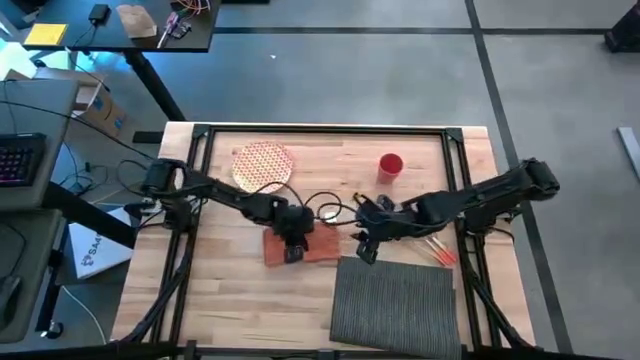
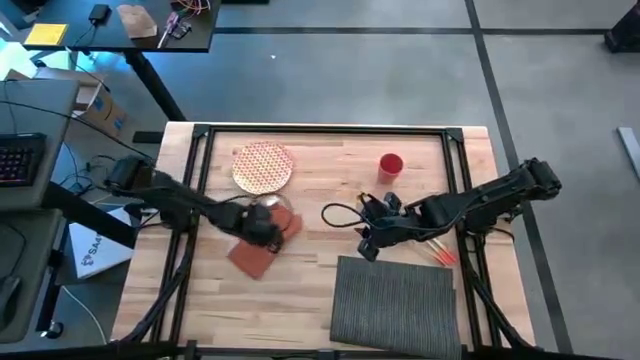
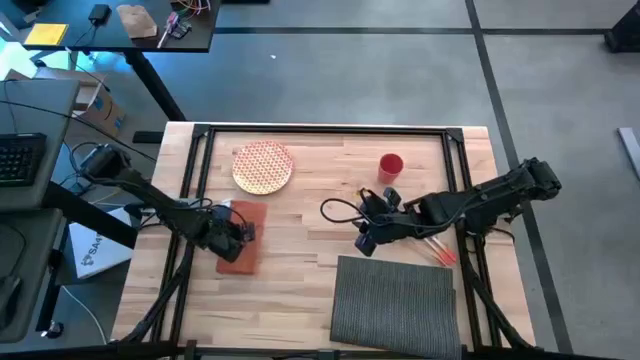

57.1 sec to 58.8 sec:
Task: Set table place
Move the napkin to the middle left of the table

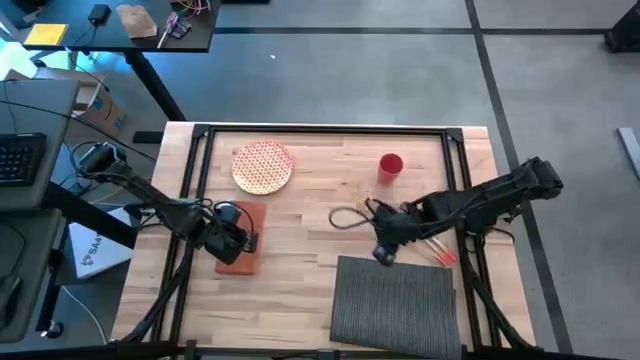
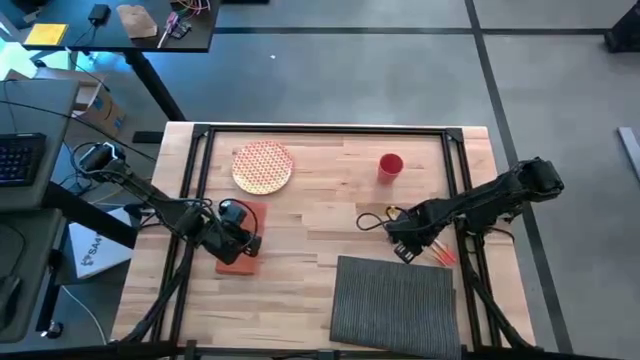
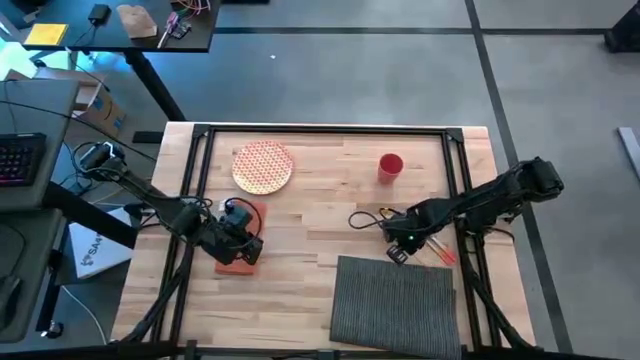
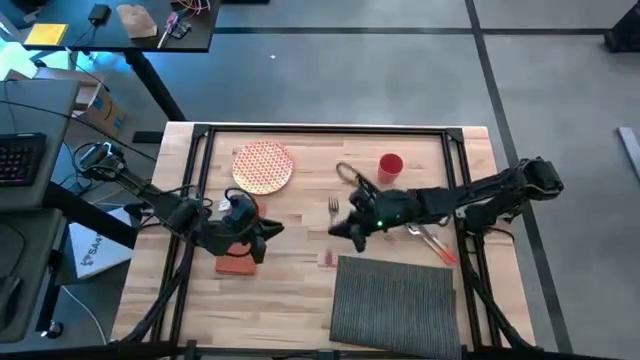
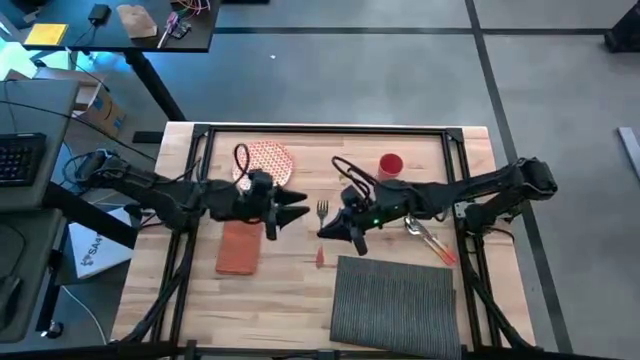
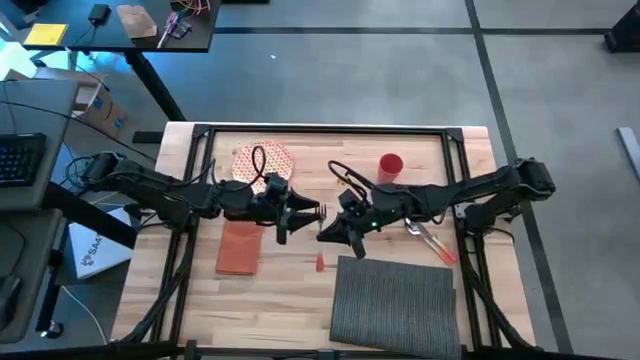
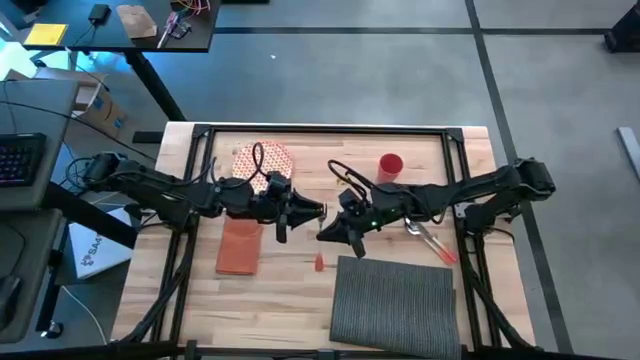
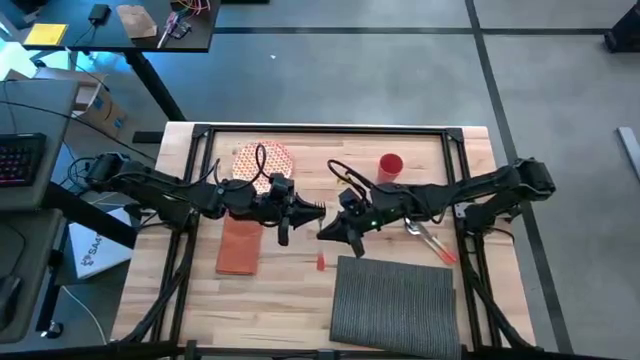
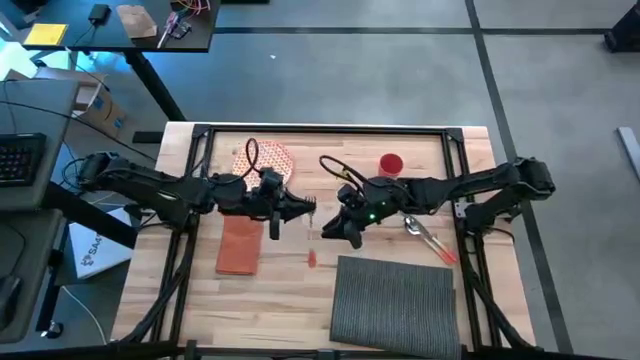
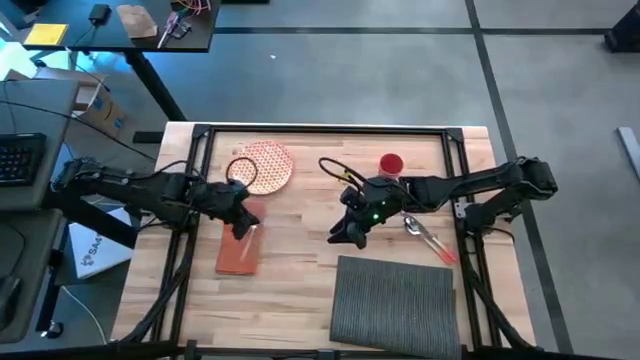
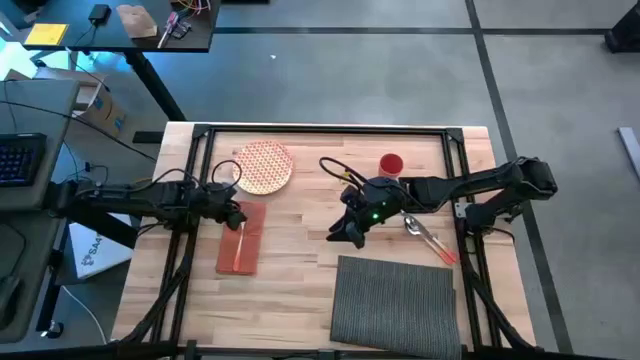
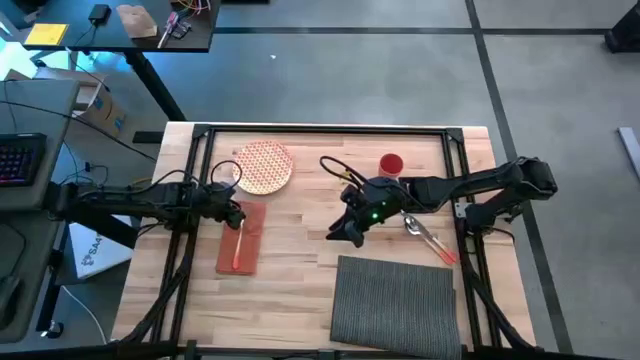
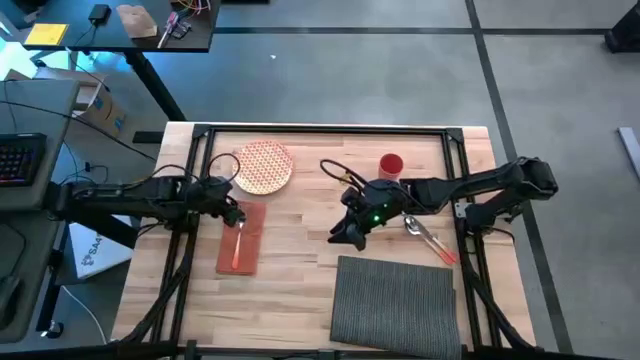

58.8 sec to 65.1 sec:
Put the fork on the top of the orange napkin

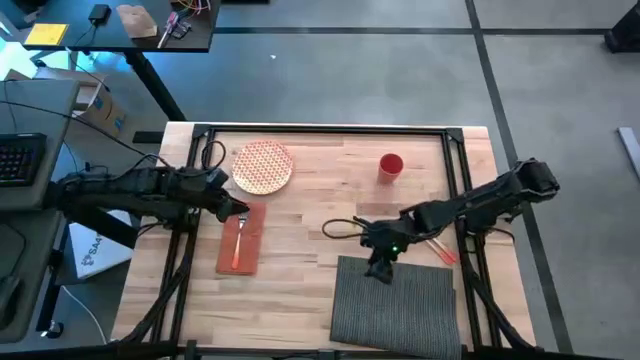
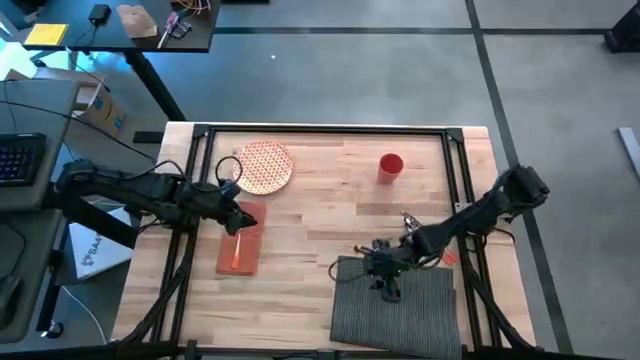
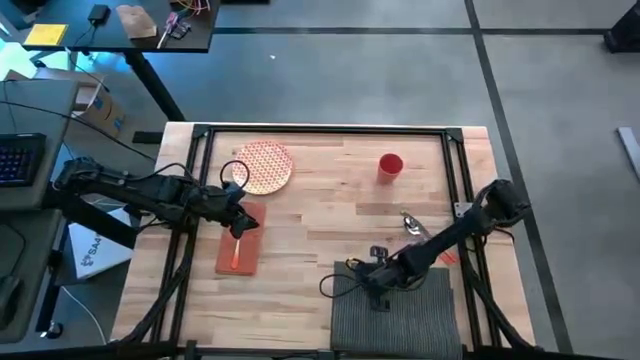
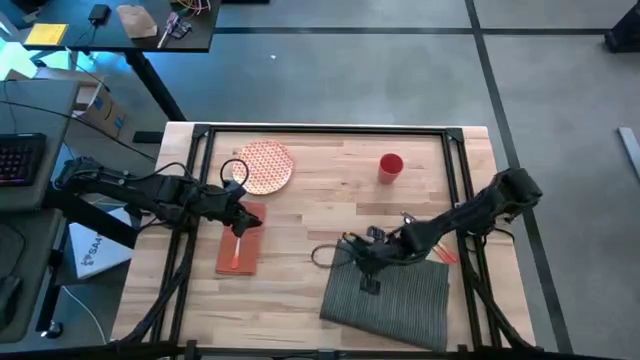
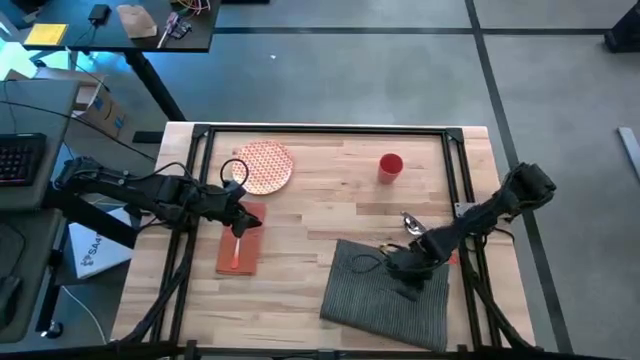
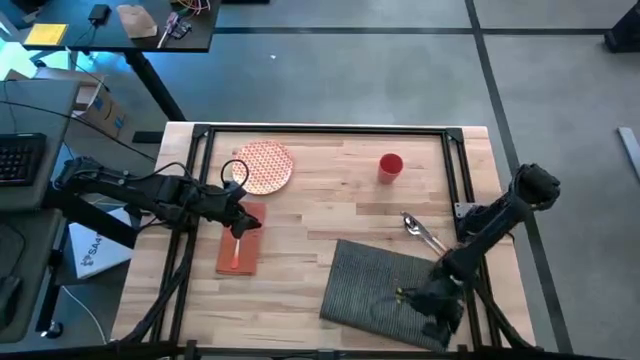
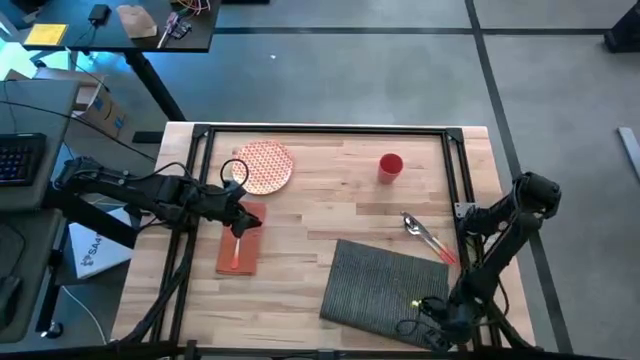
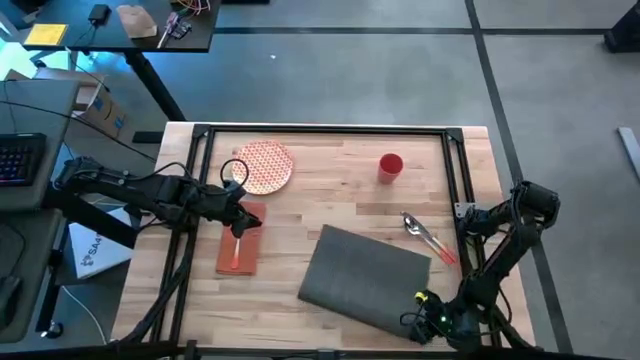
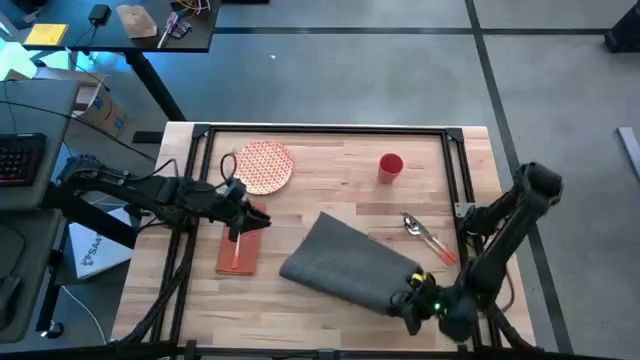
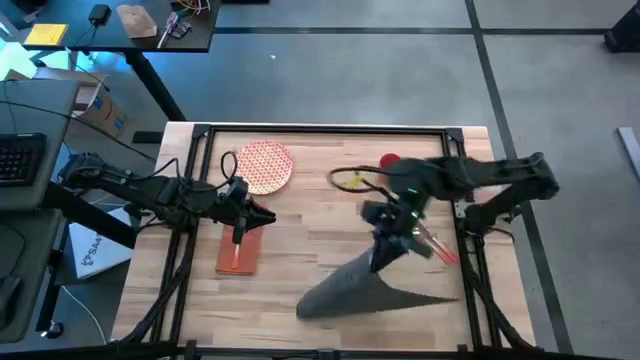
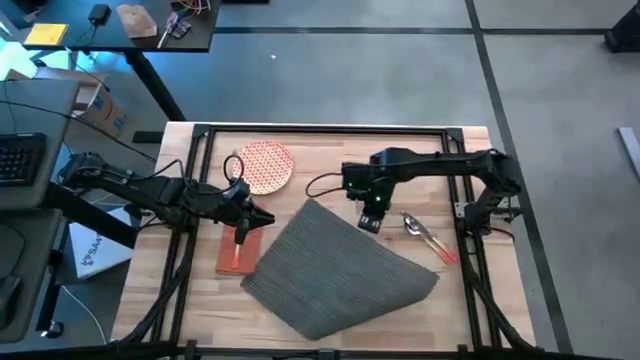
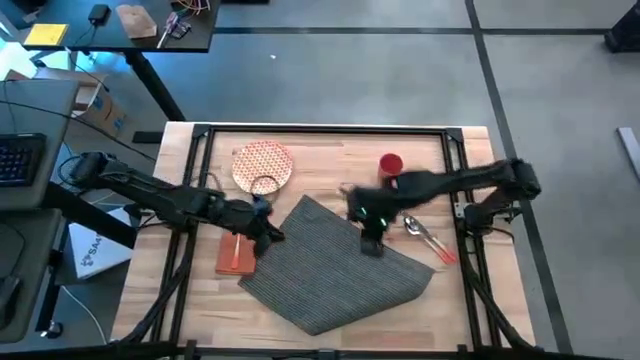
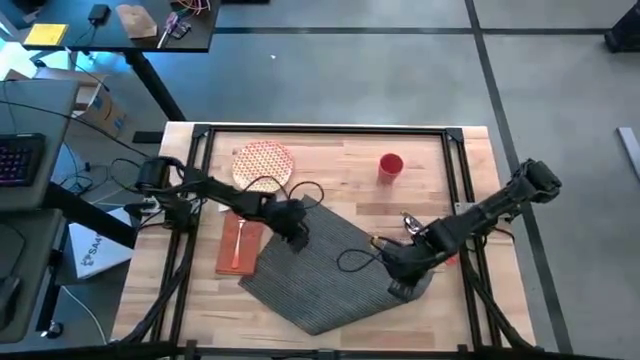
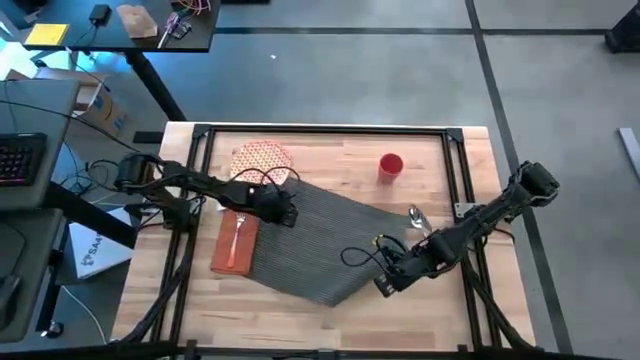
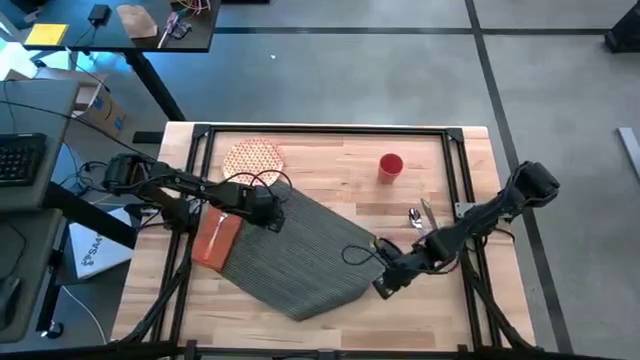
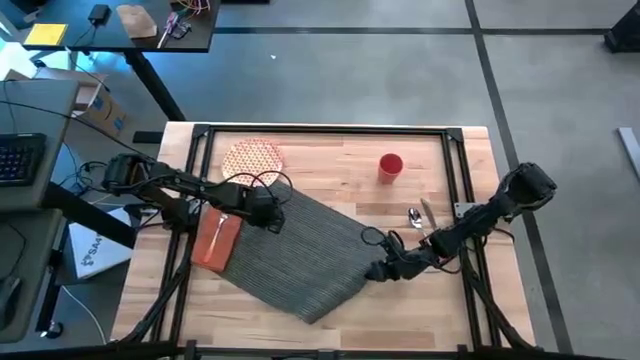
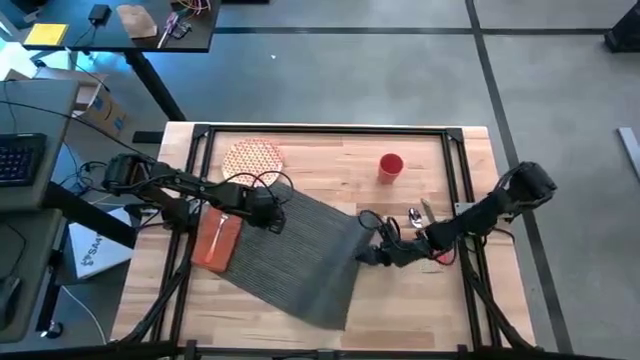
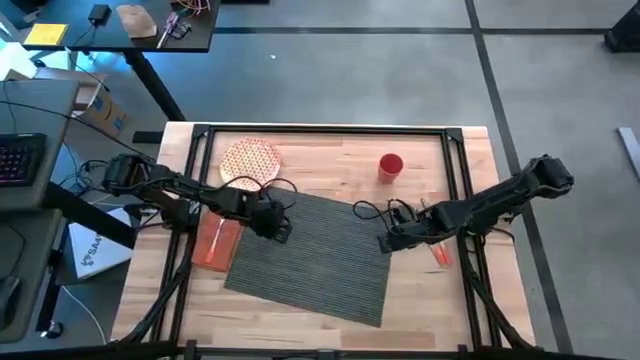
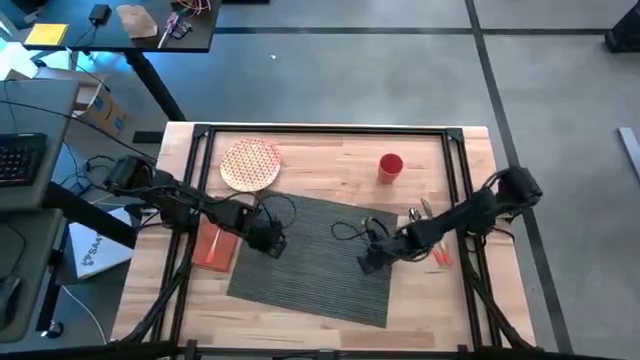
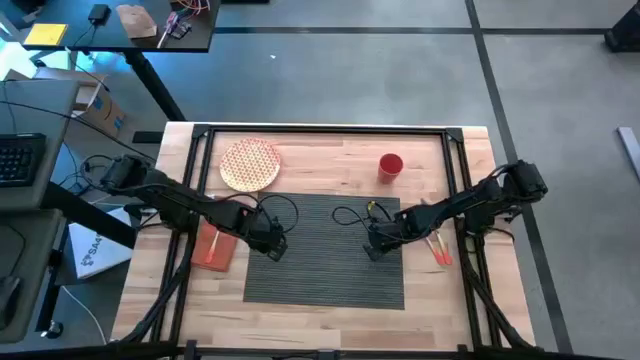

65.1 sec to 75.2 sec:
Move the gray placemat to the center

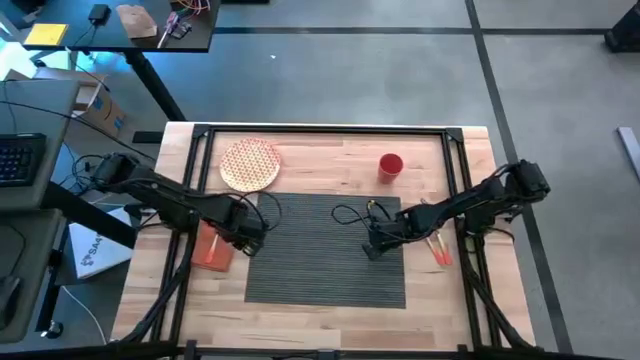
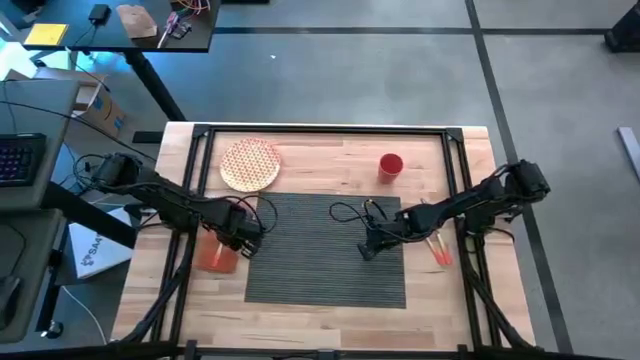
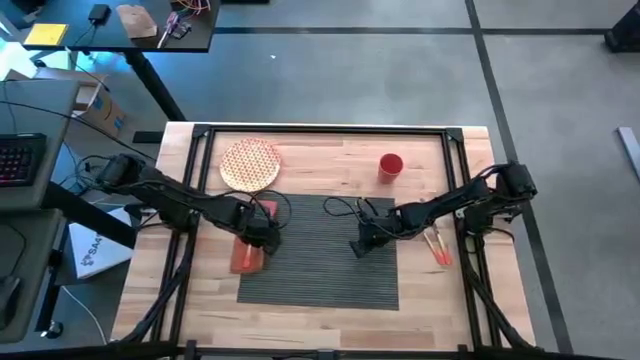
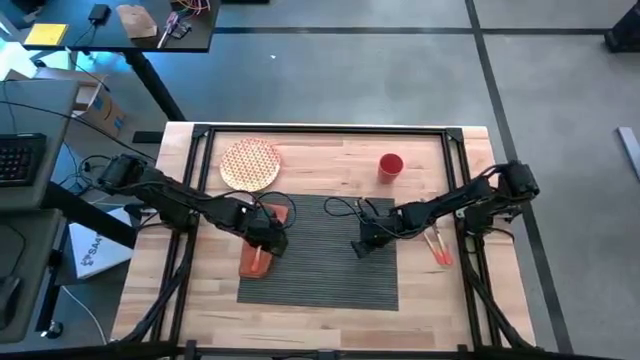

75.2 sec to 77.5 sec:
Put the orange napkin on the top of the gray placemat

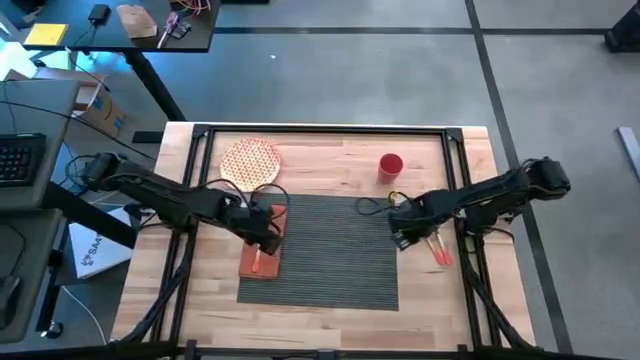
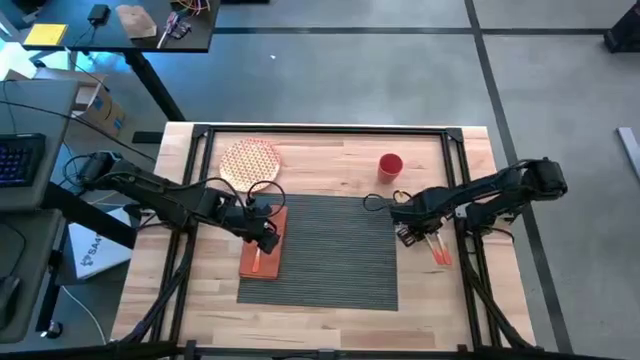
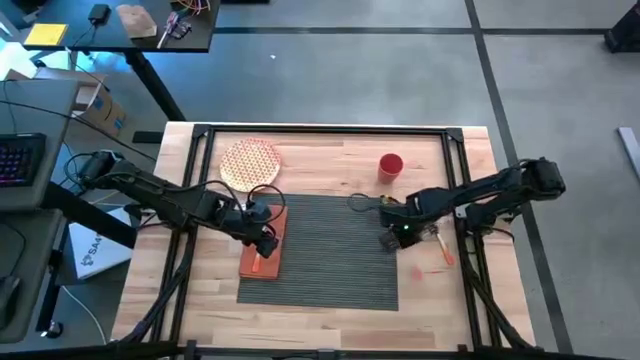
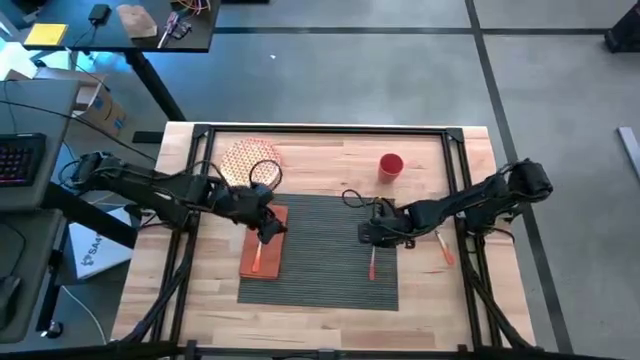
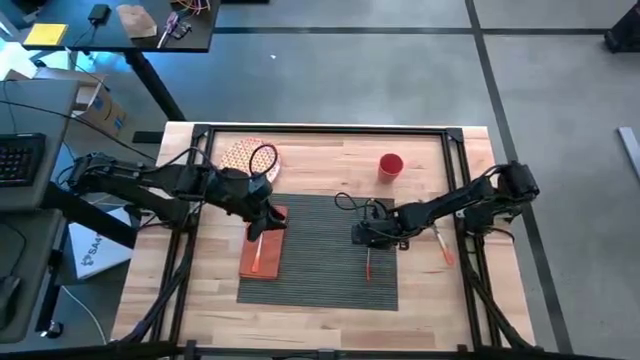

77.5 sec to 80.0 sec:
Place the spoon on the top of the gray placemat
